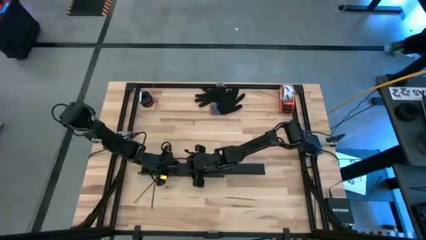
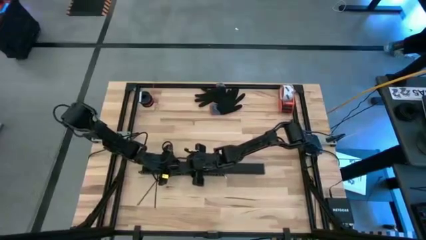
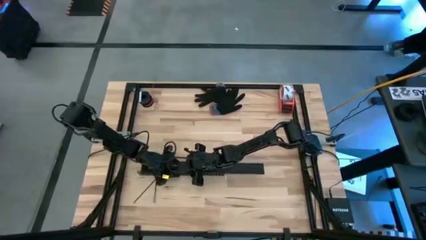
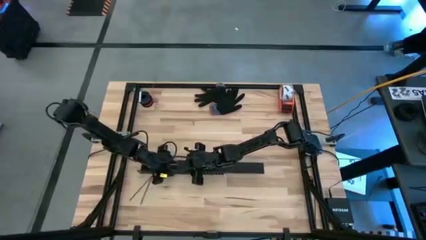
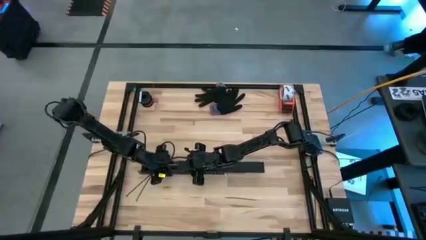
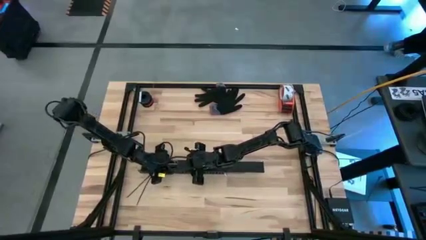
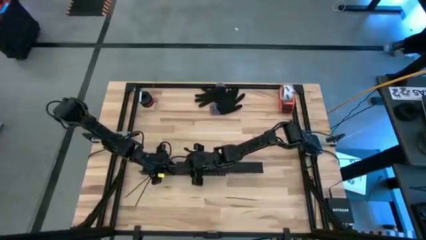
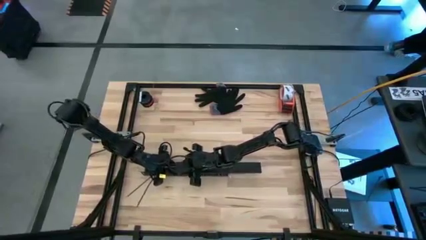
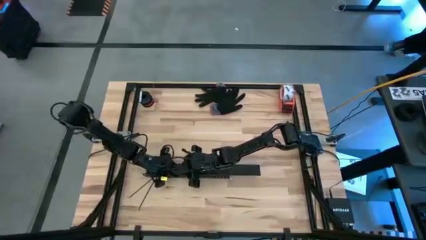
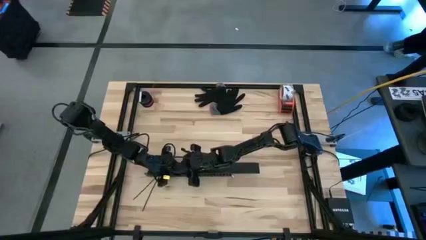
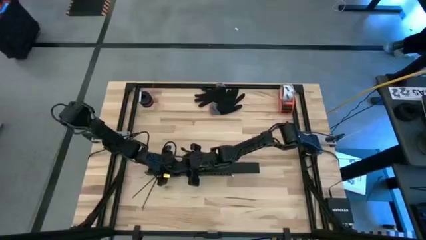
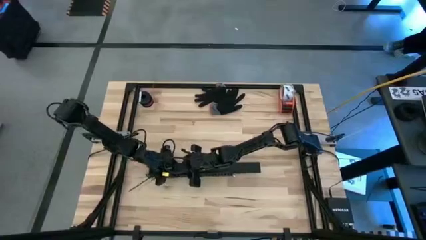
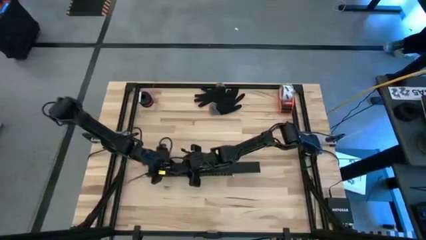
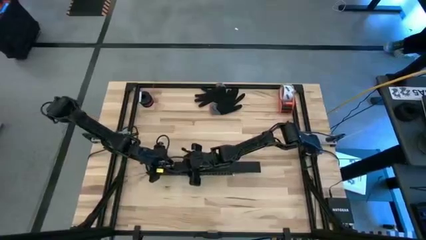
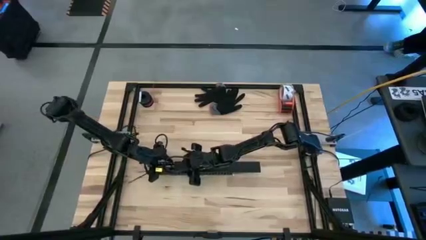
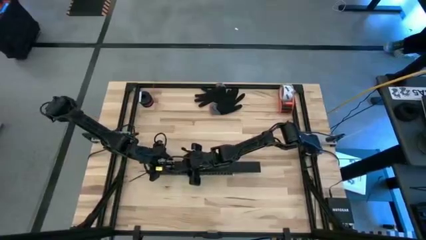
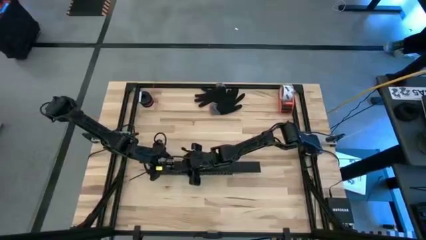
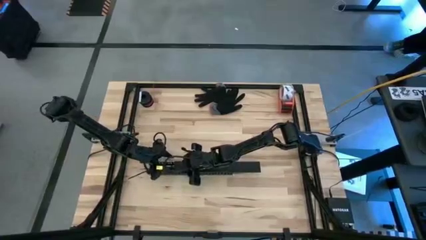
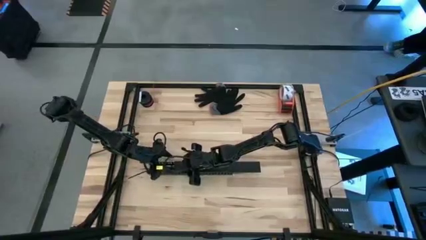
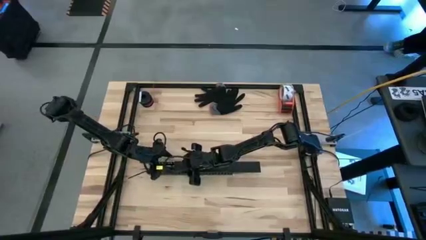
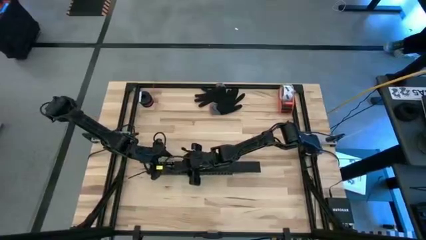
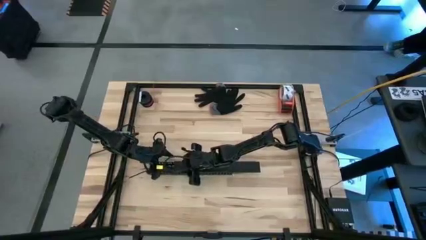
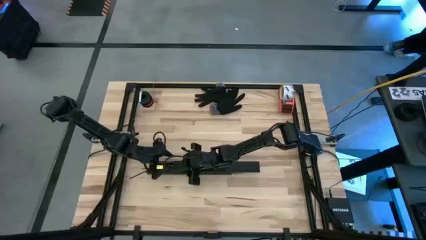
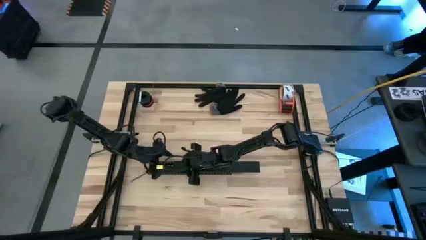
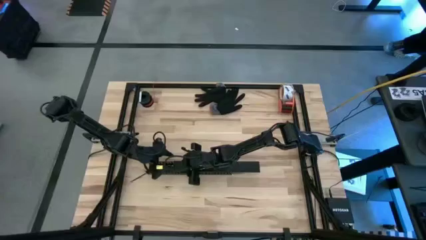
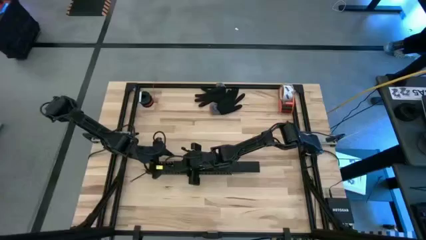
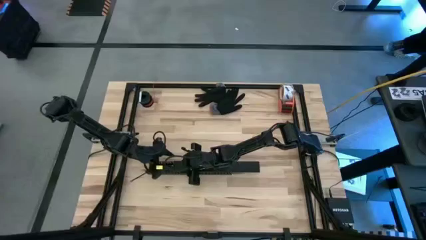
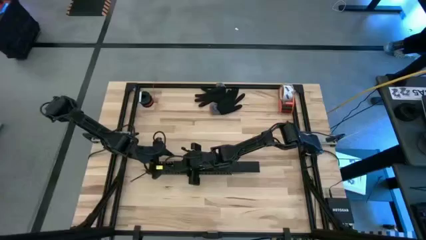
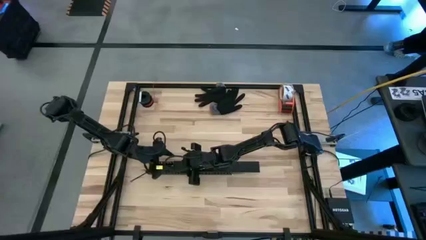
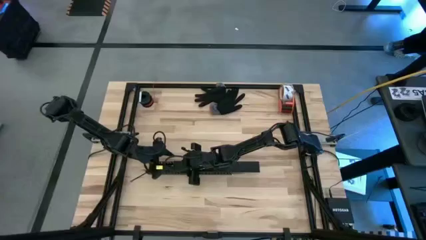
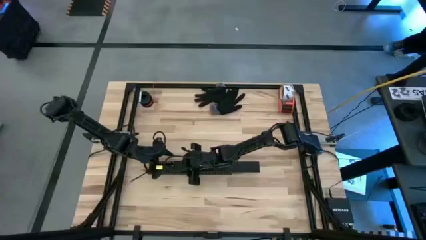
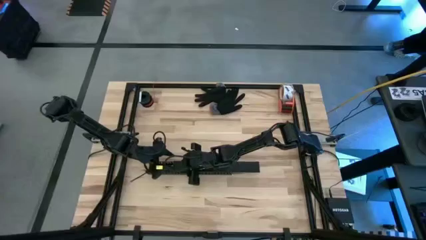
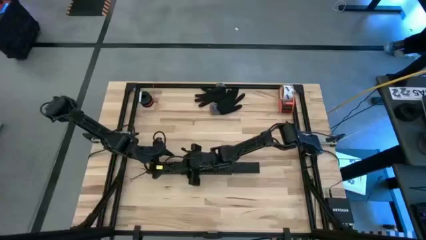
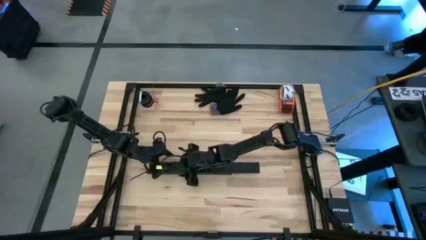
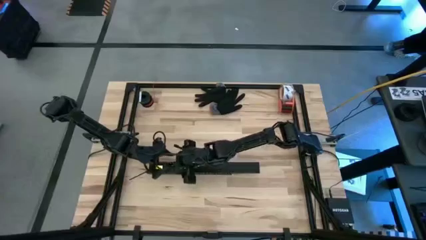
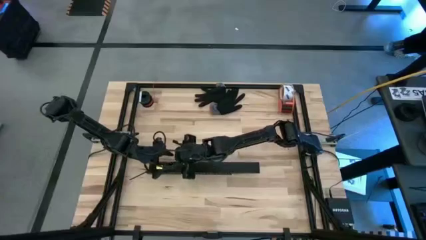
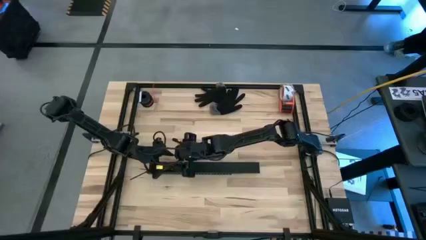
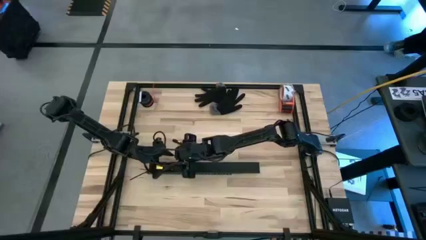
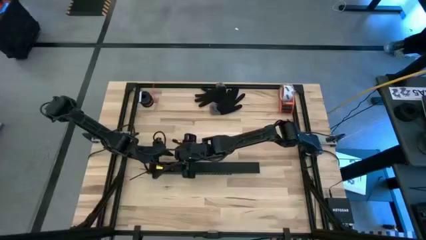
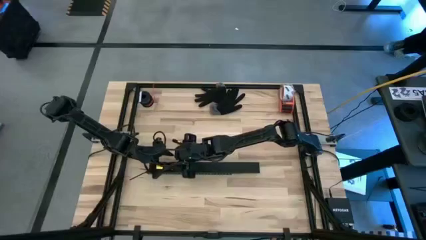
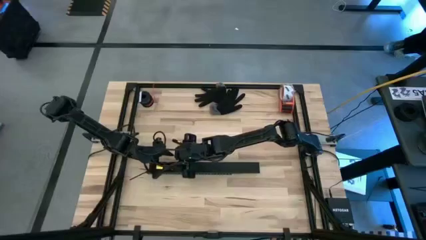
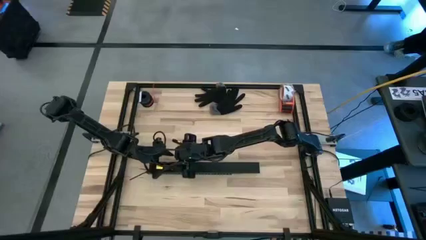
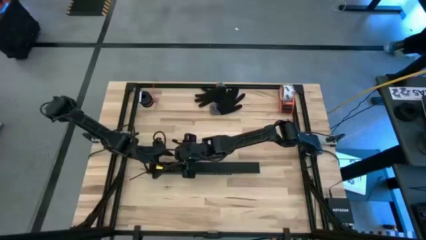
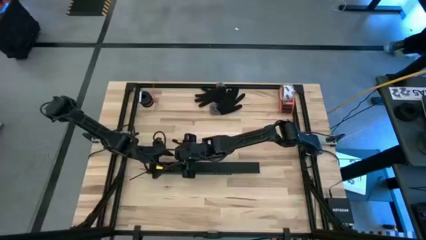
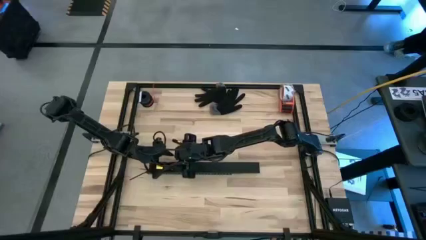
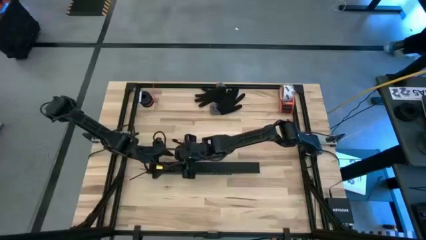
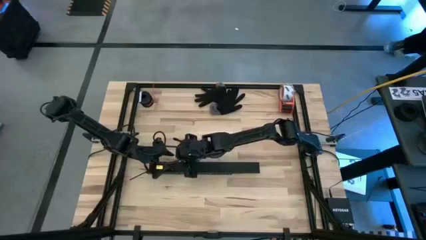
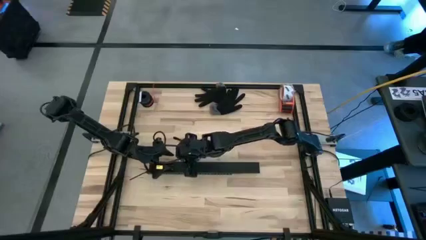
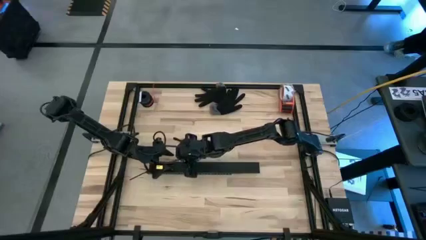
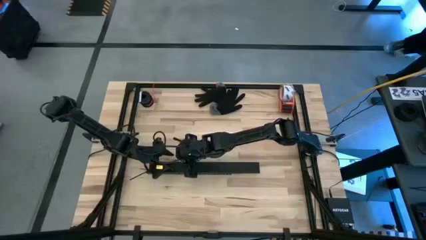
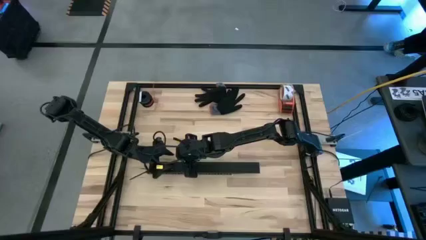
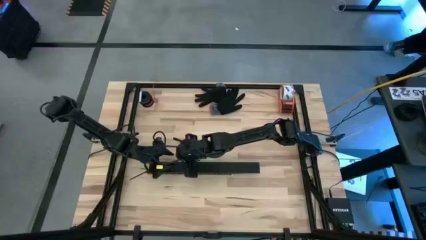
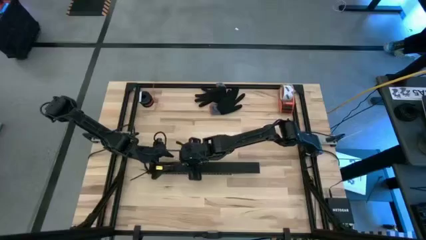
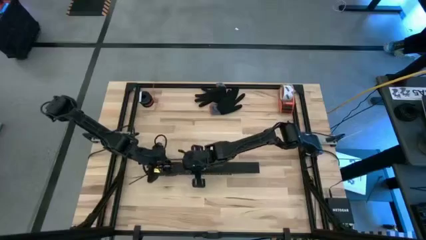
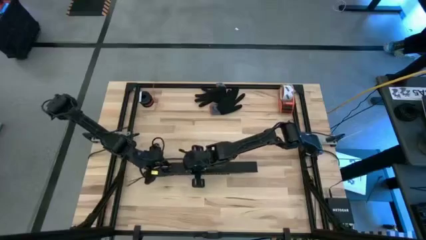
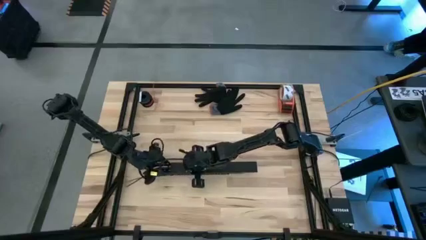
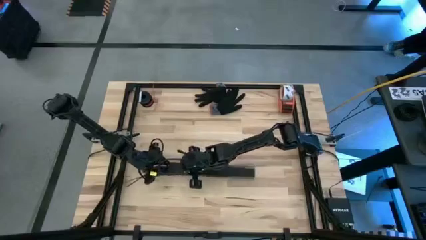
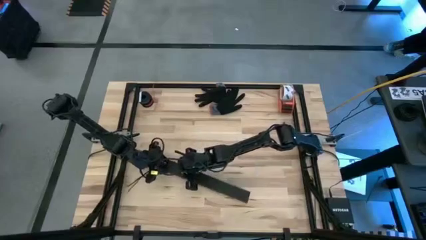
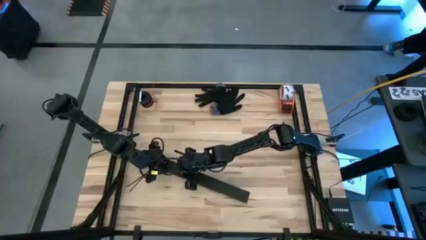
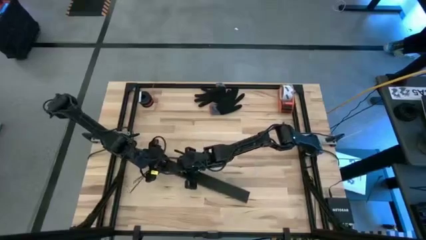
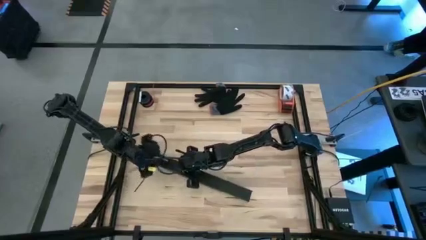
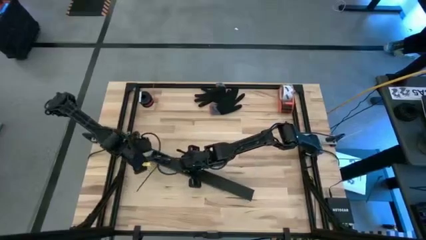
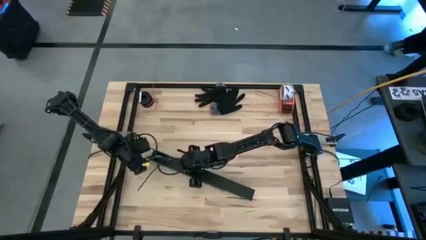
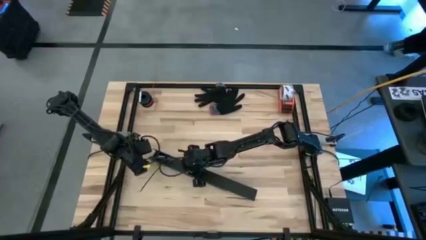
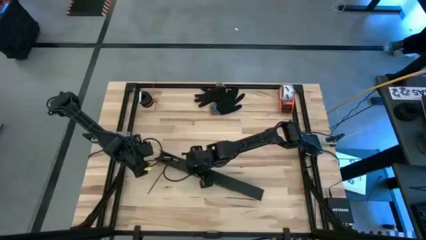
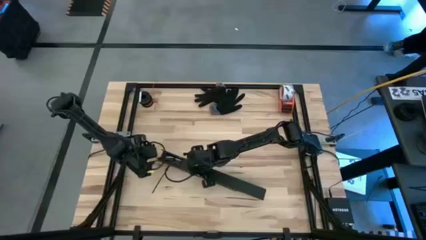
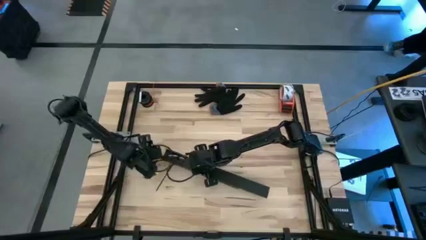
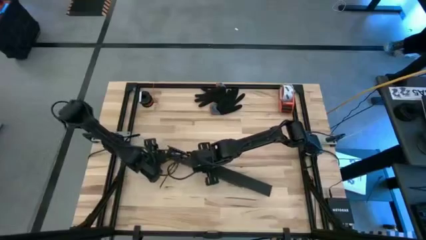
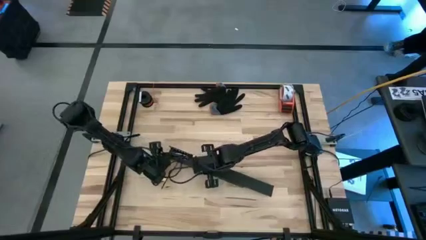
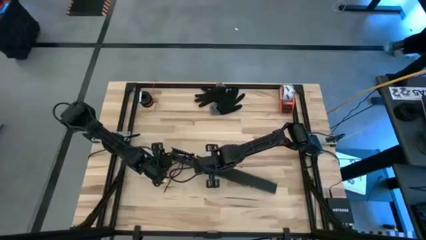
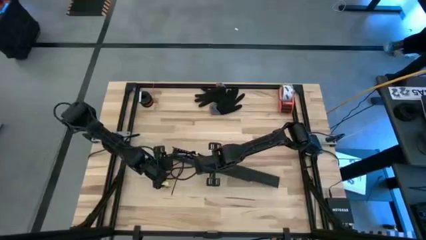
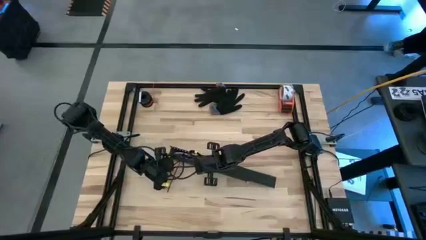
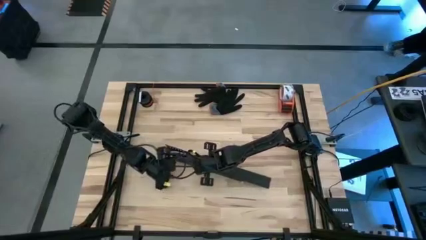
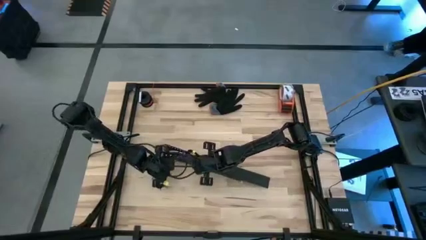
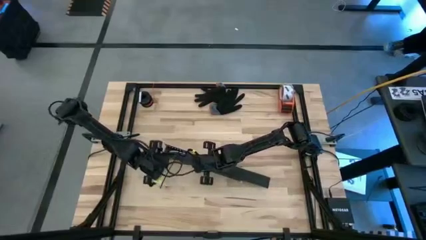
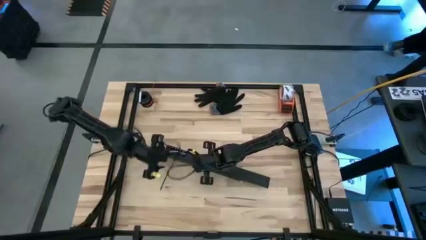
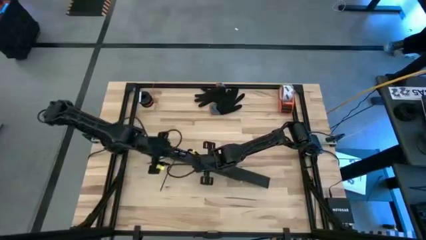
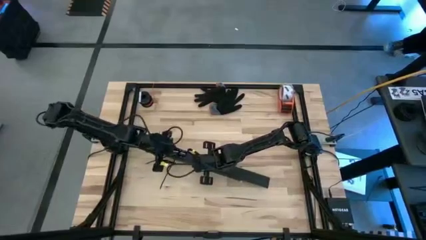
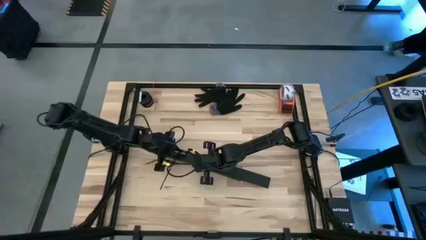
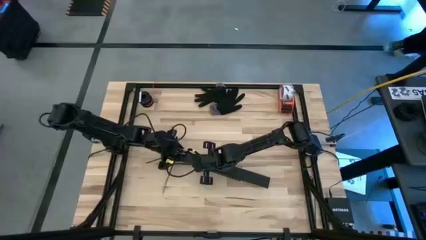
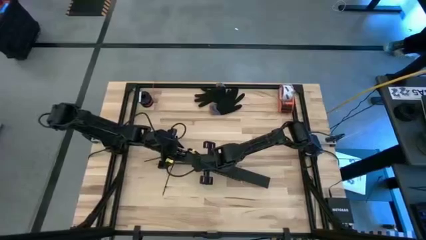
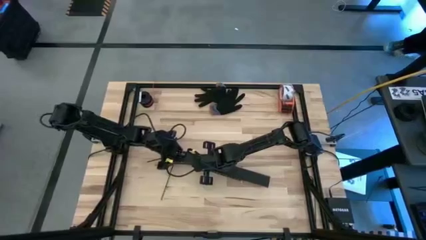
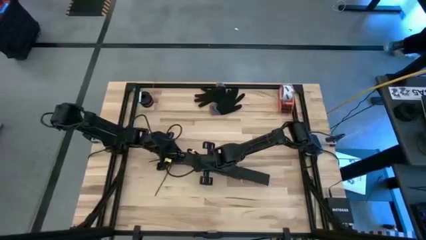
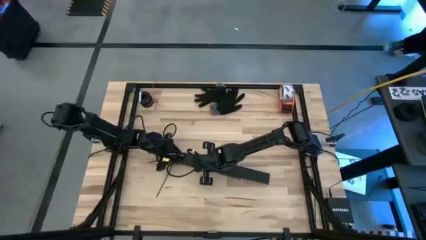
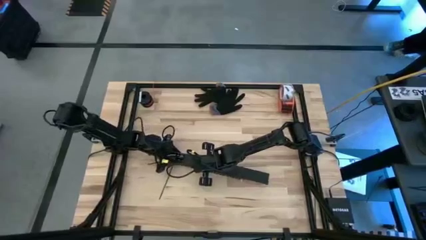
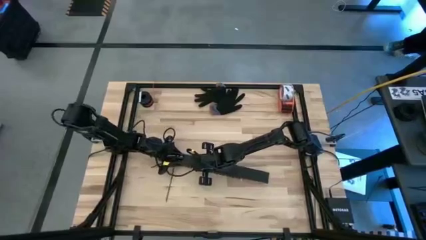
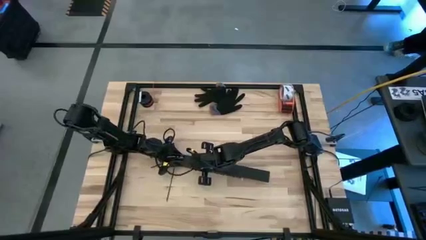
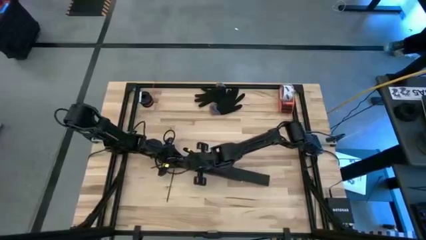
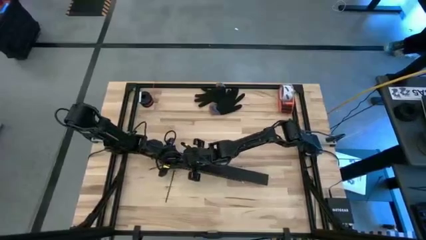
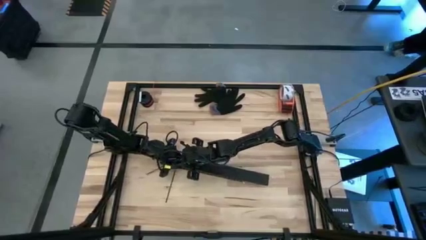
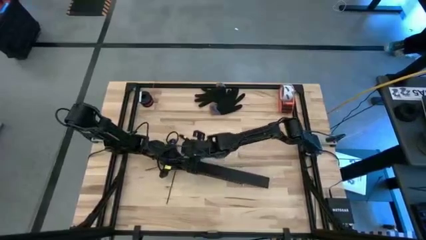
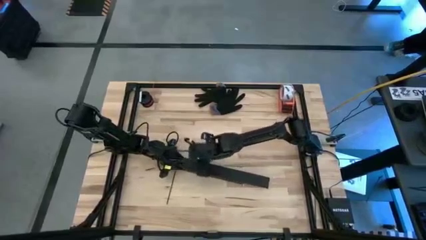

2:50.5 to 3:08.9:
Task: Ziptie cables
Close the cable duct
